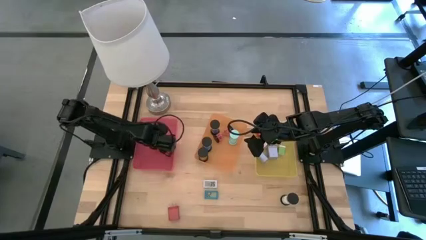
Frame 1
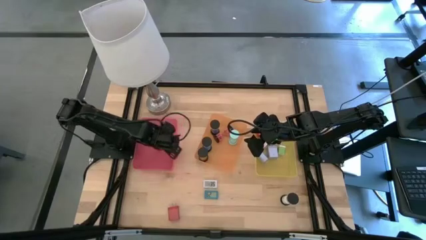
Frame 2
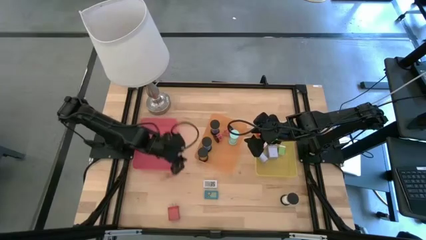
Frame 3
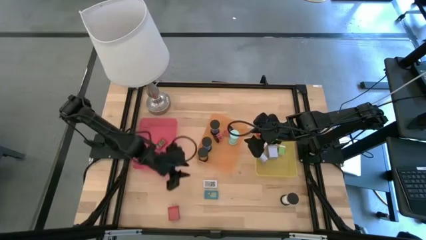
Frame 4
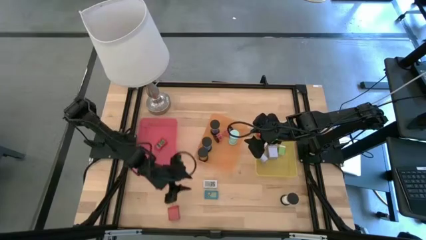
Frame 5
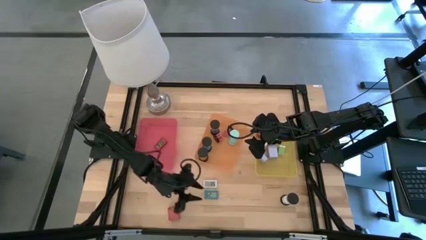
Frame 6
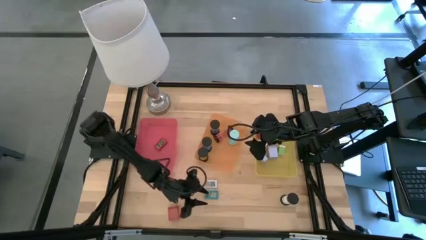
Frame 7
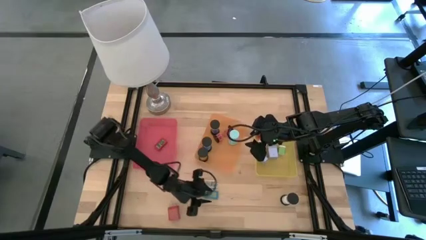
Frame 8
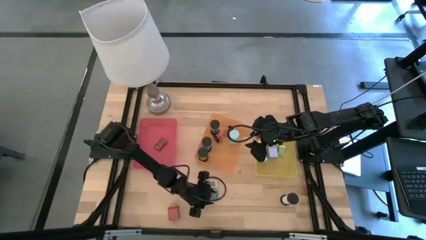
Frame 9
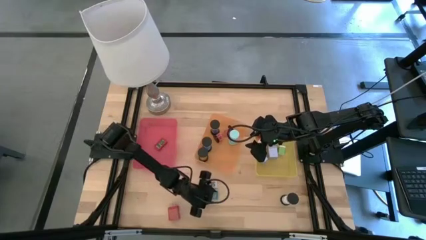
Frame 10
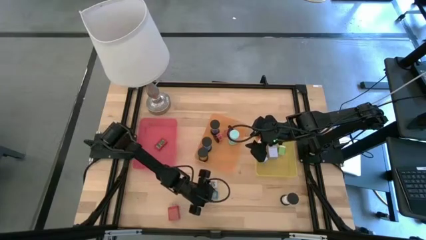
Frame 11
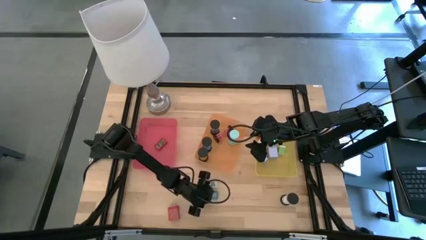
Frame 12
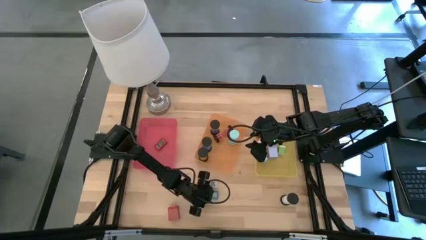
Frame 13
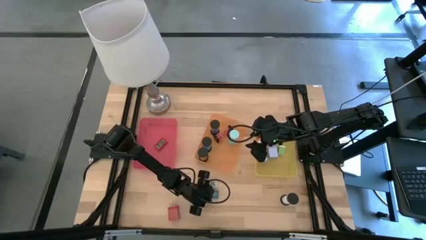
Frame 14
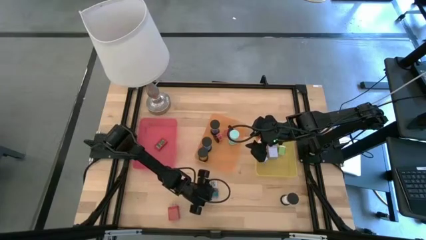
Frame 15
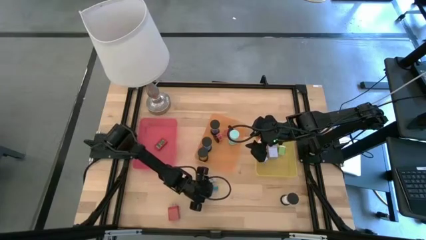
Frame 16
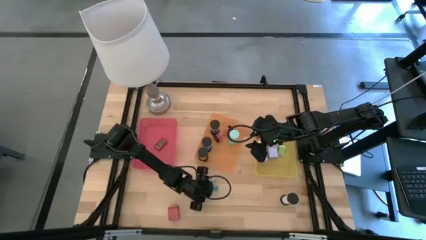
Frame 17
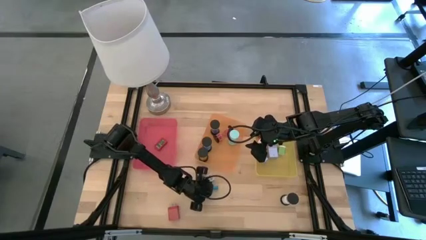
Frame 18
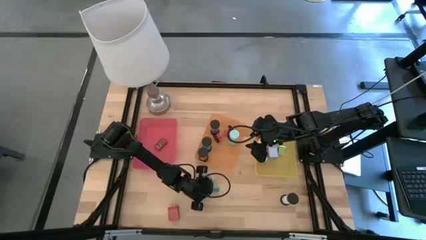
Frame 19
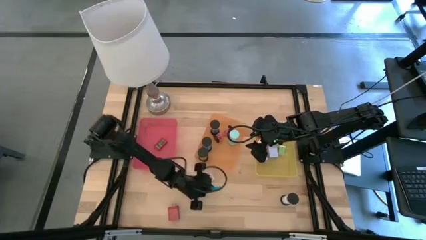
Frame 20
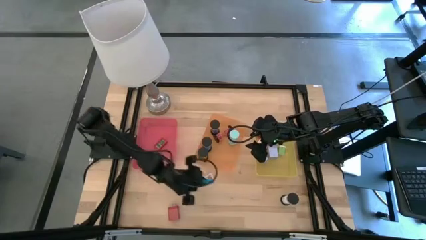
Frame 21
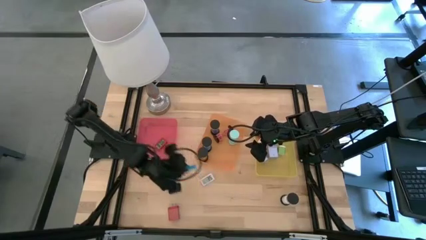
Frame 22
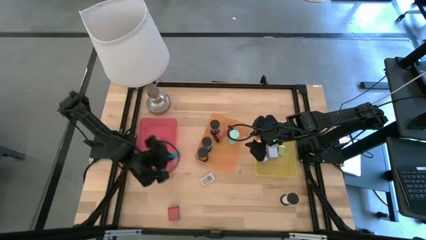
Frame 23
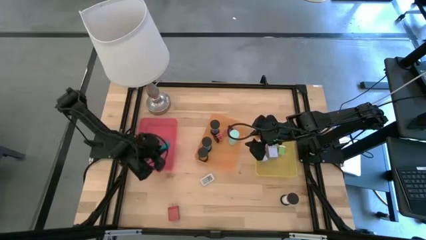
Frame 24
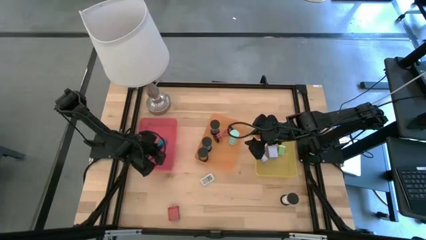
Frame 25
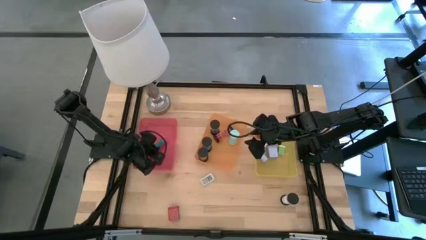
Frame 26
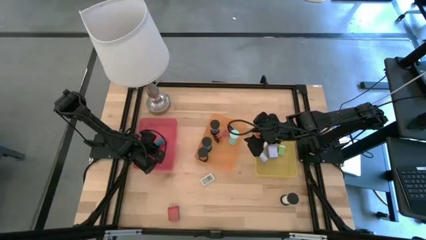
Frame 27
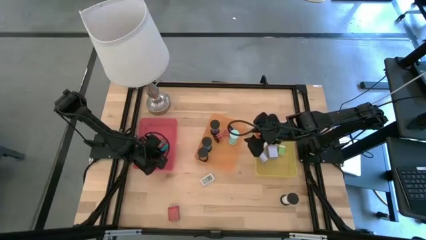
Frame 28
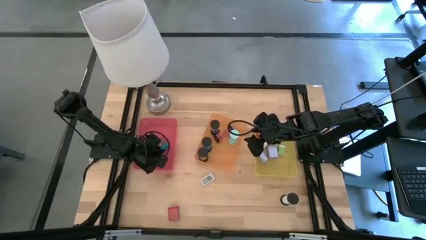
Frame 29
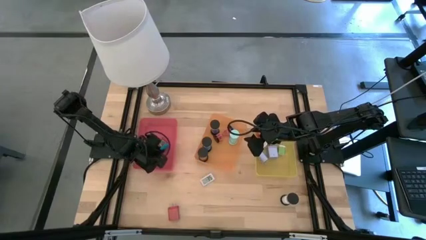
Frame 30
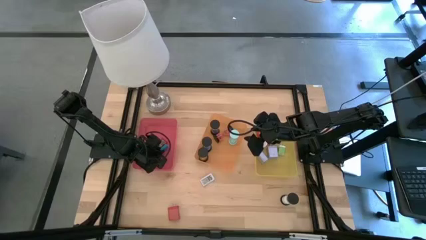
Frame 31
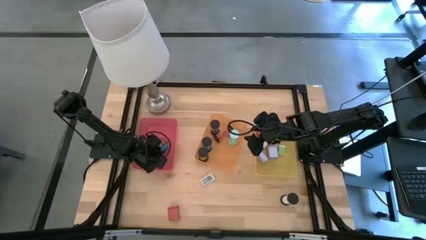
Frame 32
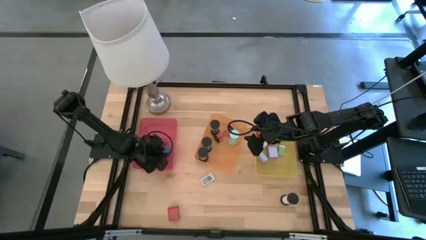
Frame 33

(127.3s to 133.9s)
Task: Pick & Place Office items
Put the blue digital clock into the pink bin

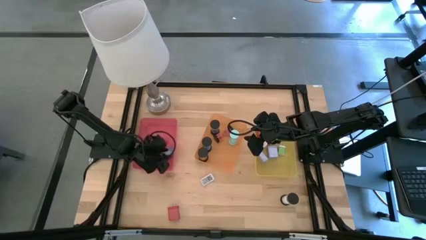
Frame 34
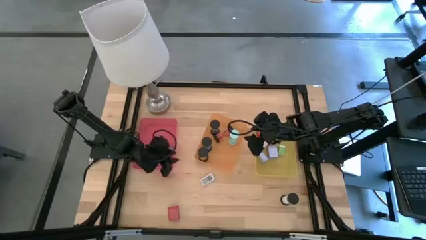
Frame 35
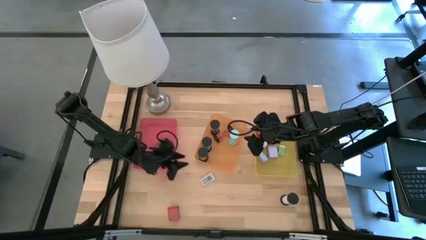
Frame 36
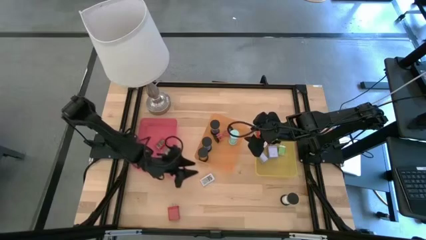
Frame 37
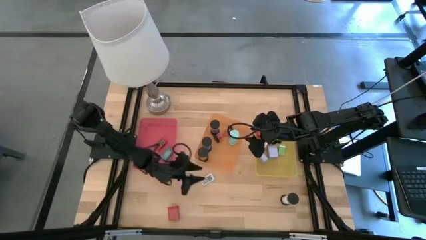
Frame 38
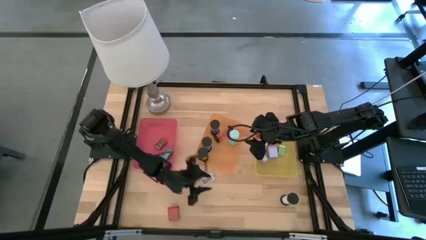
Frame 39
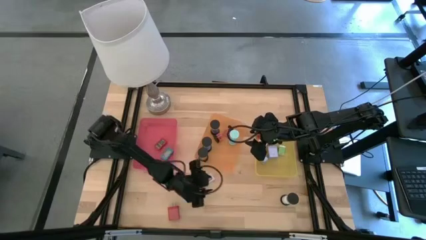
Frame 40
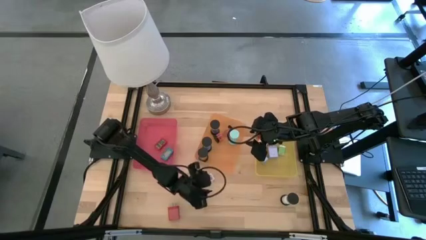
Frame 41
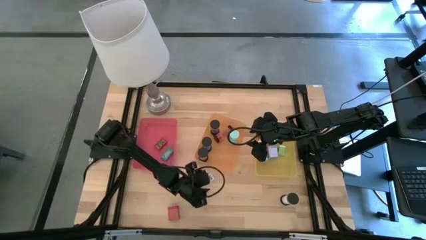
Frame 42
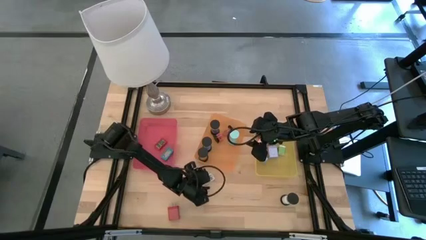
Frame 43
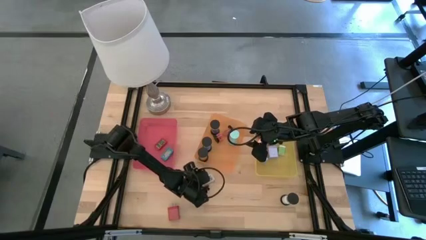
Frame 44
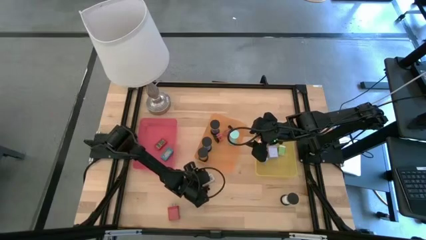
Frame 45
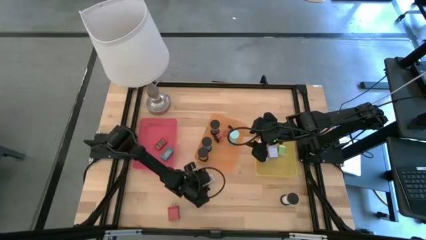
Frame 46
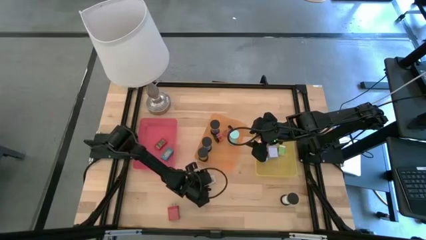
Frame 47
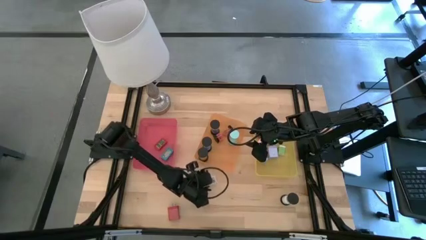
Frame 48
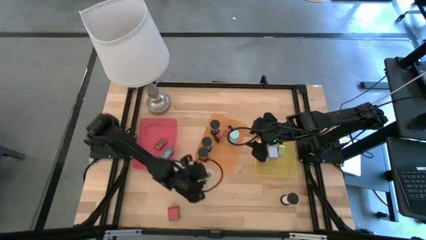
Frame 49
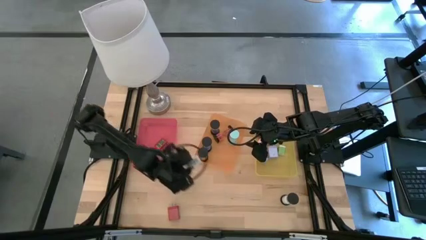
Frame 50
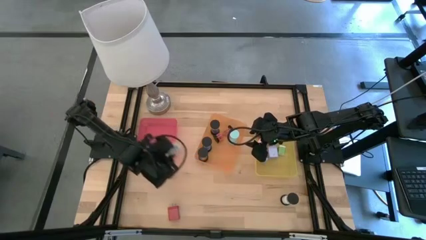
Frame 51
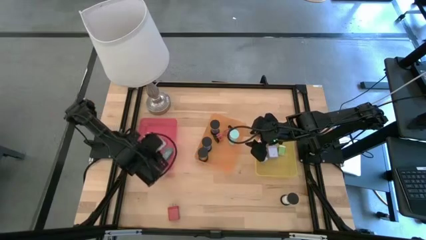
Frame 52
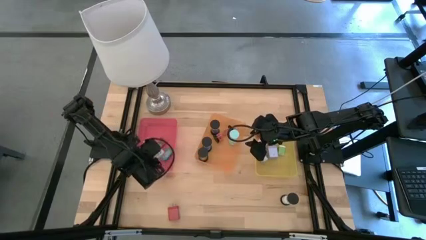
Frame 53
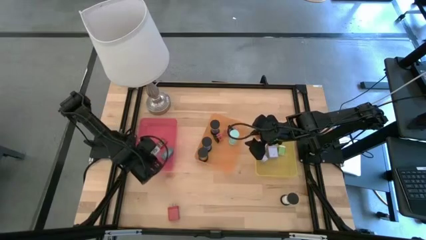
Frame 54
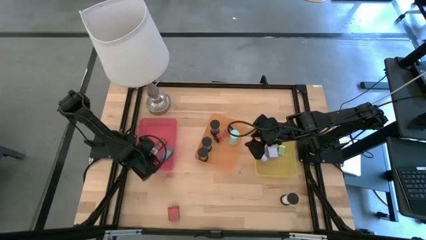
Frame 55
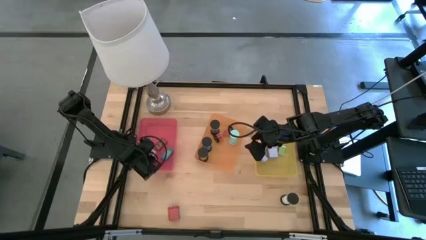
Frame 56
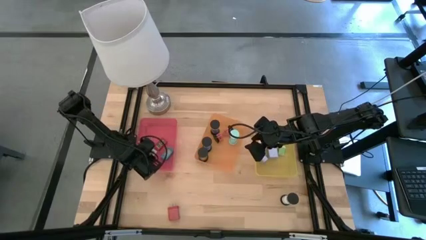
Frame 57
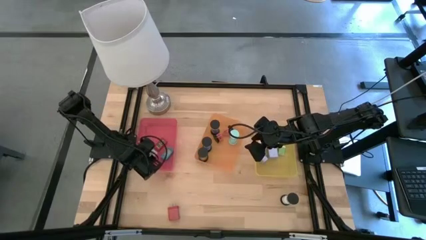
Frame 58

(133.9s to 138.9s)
Put the white digital clock into the pink bin
